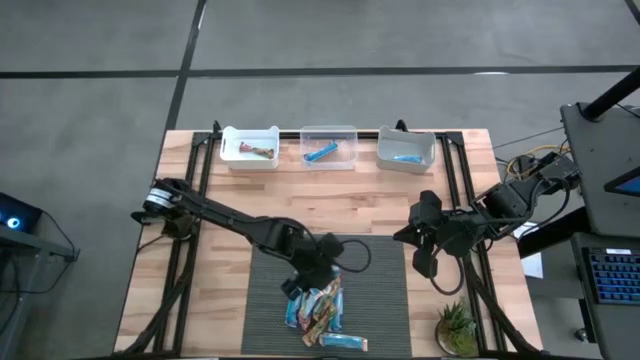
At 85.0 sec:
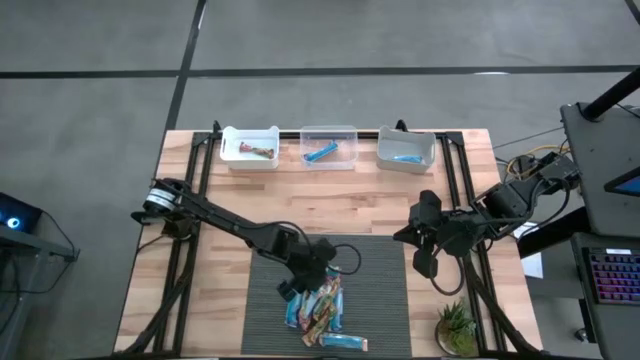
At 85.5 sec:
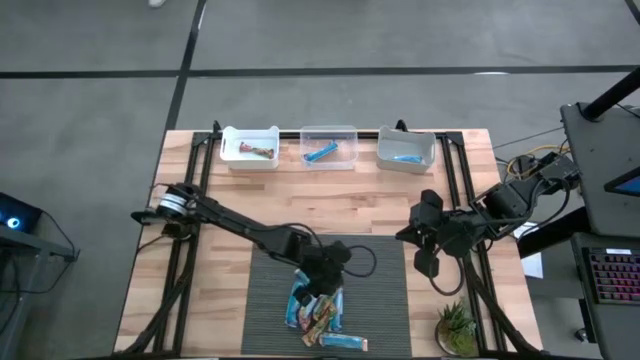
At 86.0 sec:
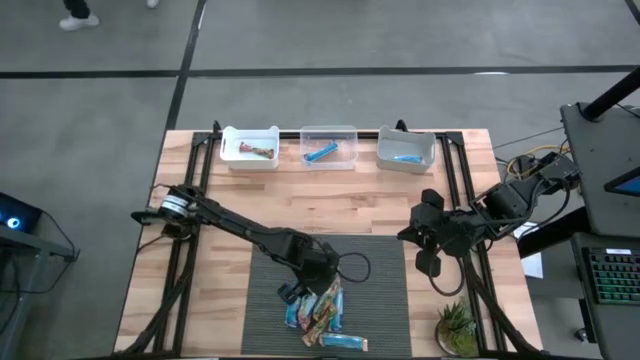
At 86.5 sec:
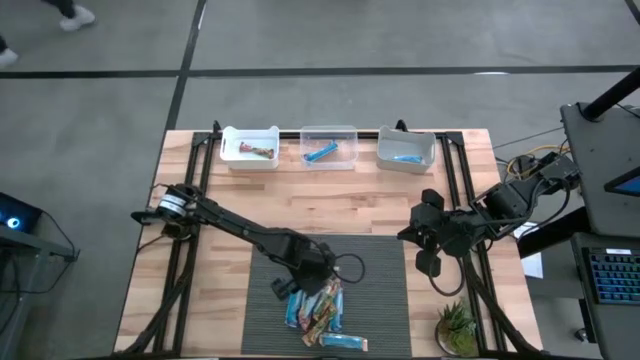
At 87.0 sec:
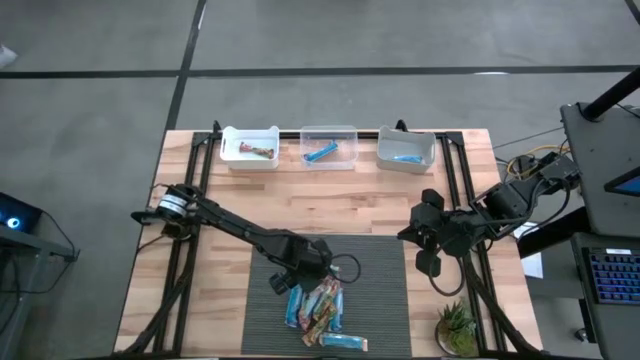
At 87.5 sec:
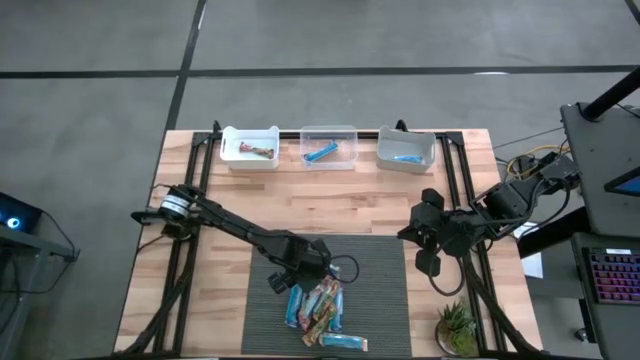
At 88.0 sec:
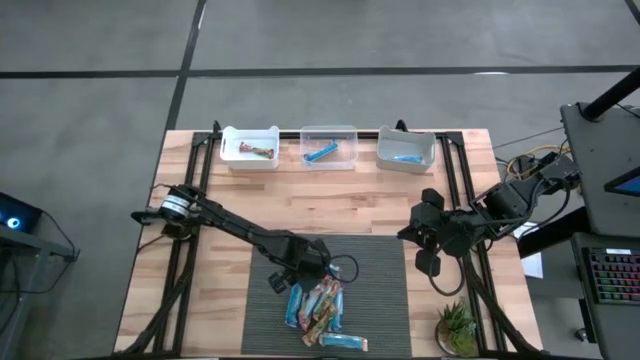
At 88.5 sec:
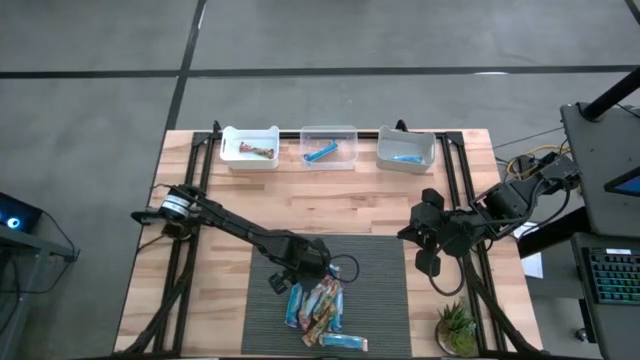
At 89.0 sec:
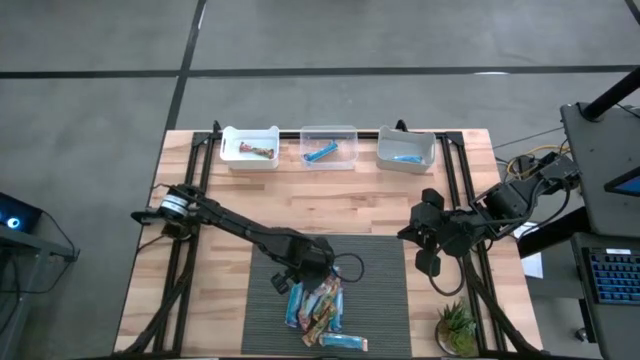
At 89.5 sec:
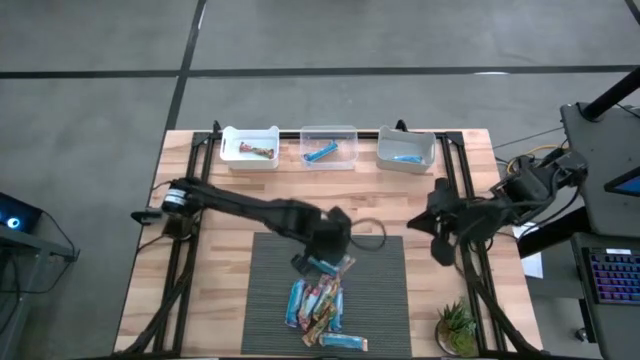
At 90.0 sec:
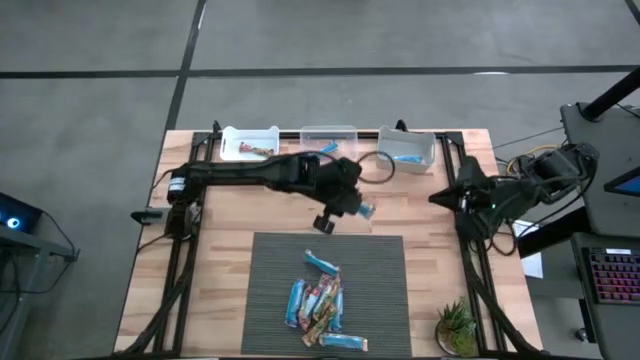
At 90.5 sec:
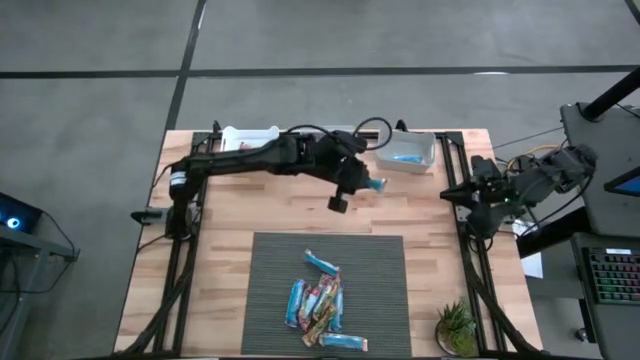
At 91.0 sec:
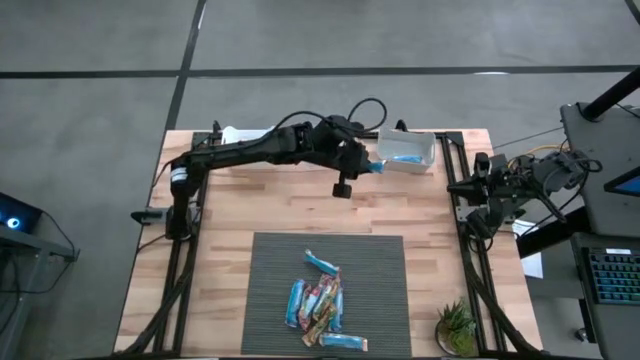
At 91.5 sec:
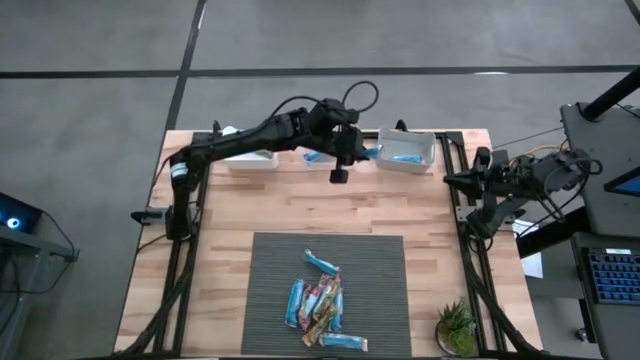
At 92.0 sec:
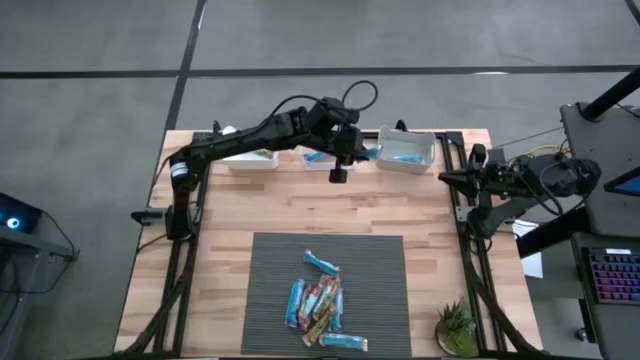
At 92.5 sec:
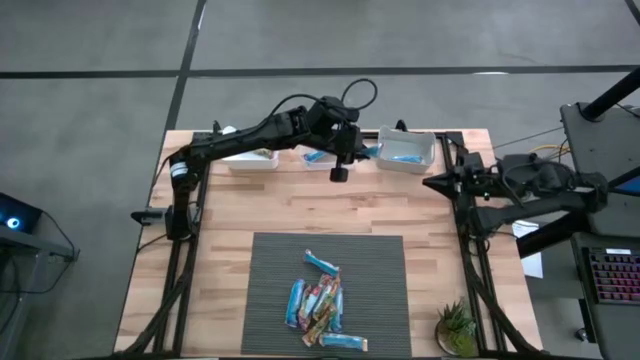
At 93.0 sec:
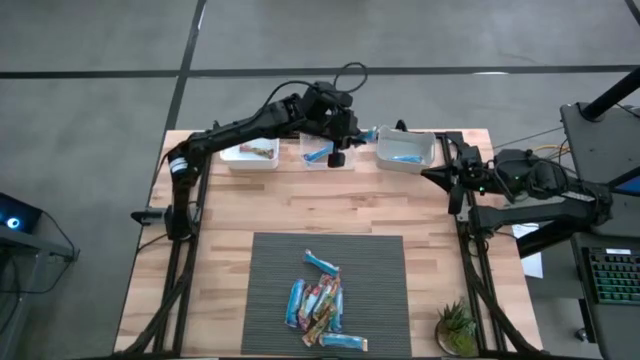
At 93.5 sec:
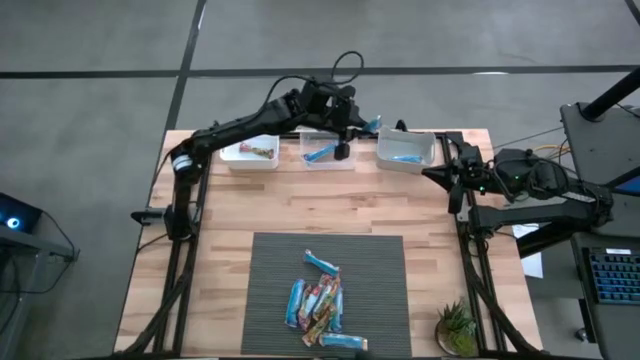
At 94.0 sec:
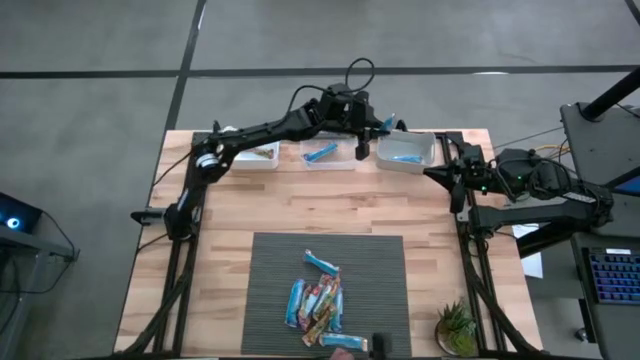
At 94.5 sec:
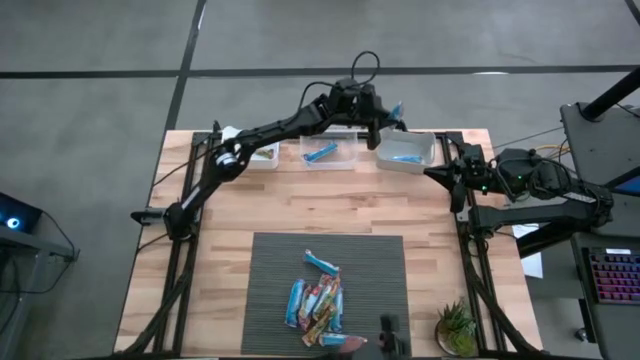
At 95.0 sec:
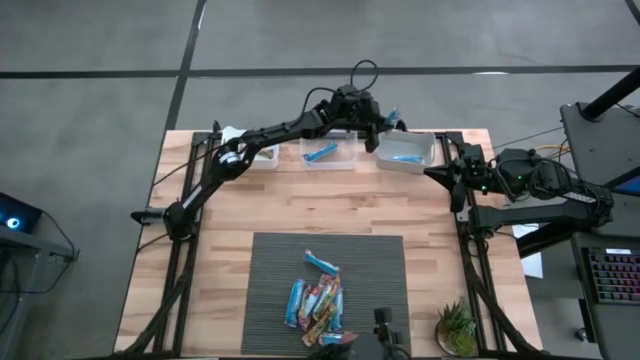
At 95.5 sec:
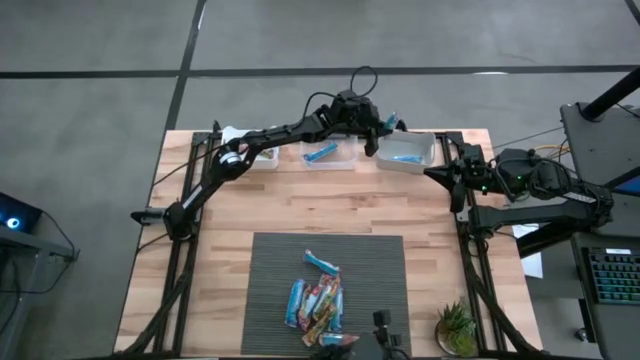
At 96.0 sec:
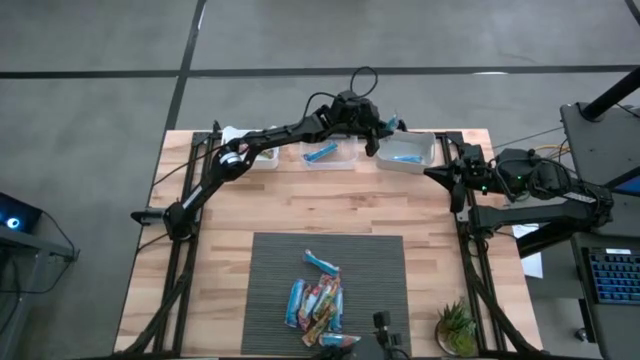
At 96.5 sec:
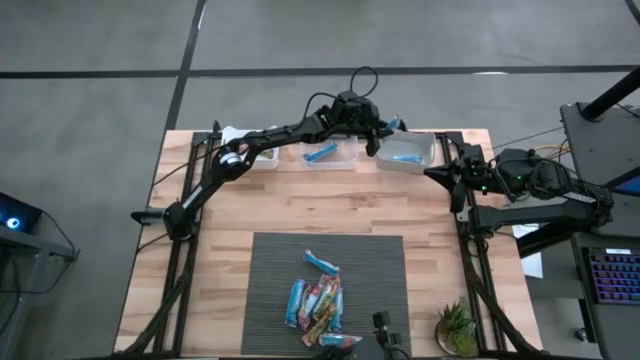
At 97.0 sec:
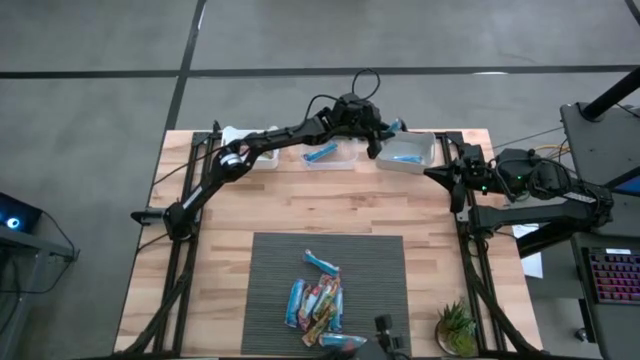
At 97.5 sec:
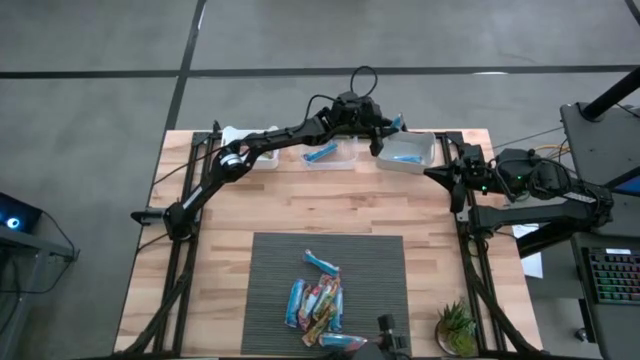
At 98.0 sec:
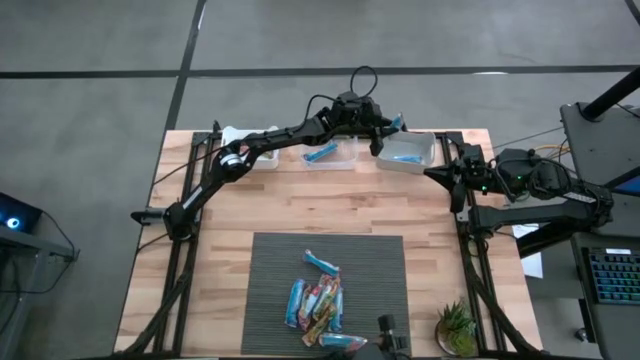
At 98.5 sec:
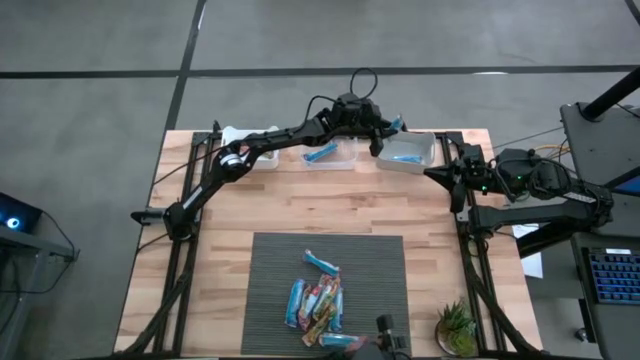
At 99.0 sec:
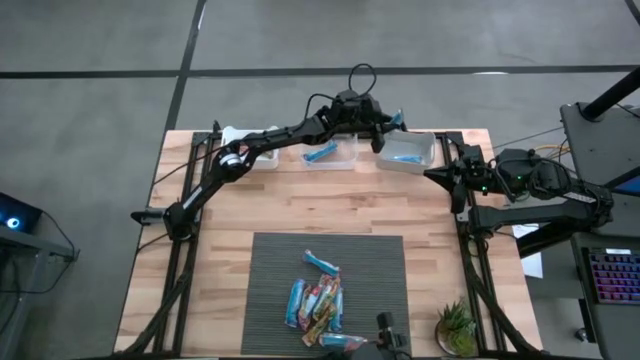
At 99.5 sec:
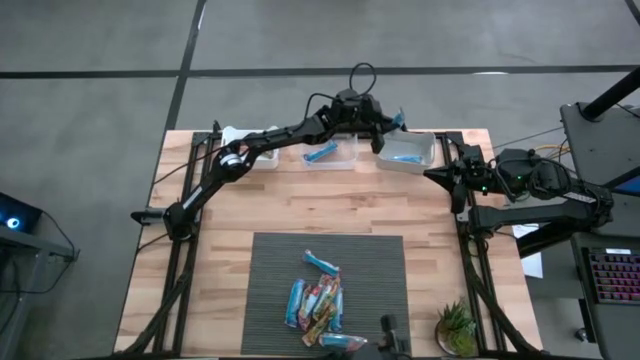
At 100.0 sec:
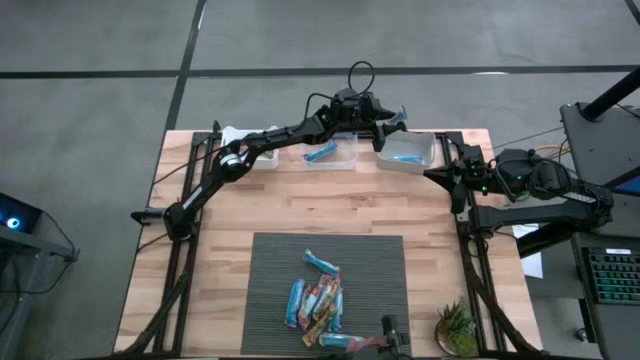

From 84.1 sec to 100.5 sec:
Task: Pick and place Granola Bars by type
Put the yellow granola bar into the gray bin

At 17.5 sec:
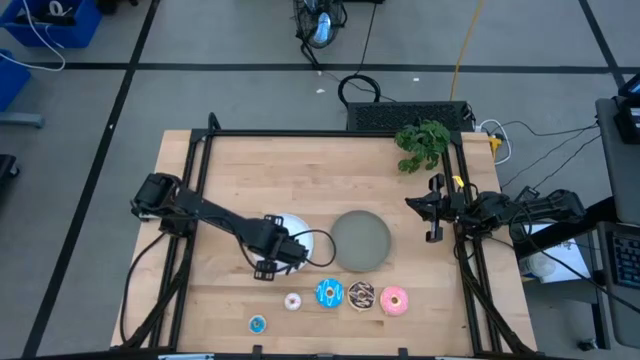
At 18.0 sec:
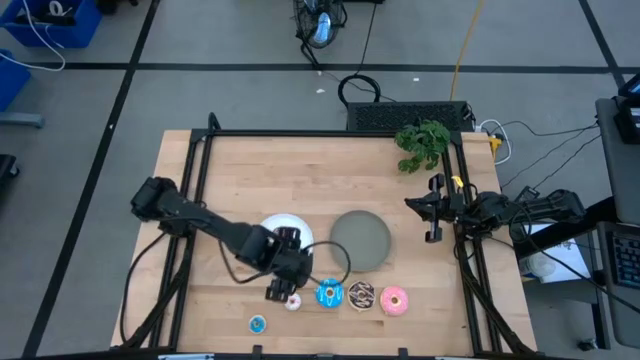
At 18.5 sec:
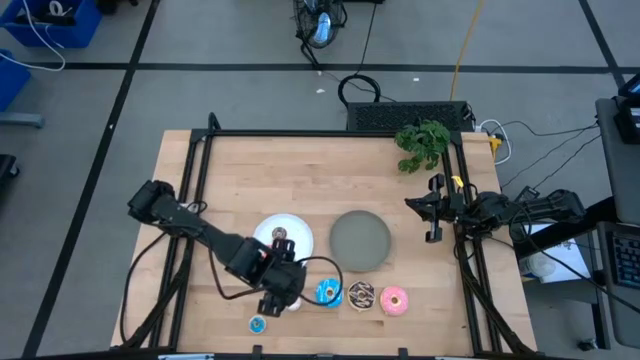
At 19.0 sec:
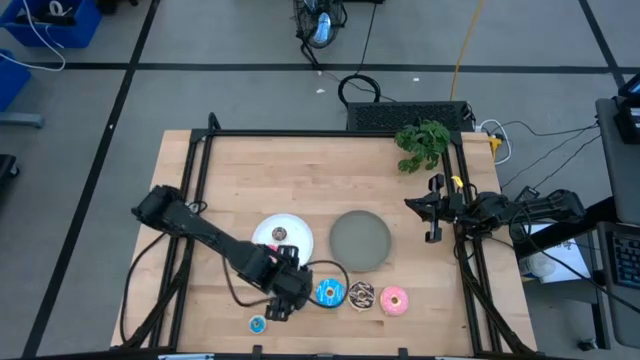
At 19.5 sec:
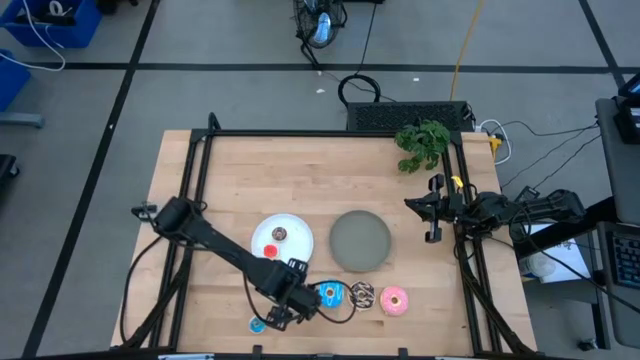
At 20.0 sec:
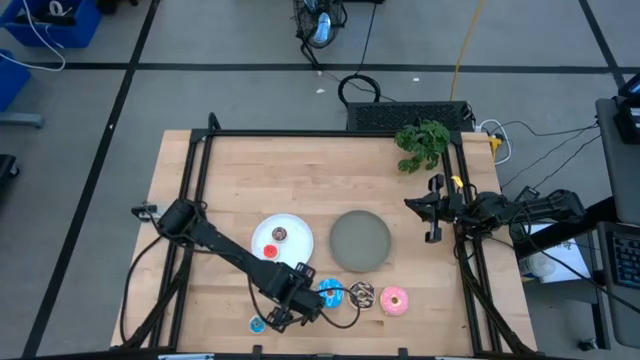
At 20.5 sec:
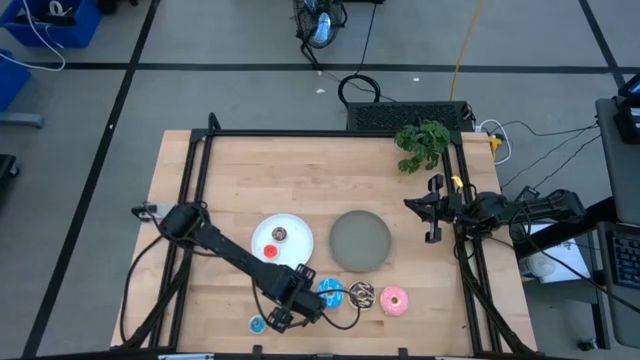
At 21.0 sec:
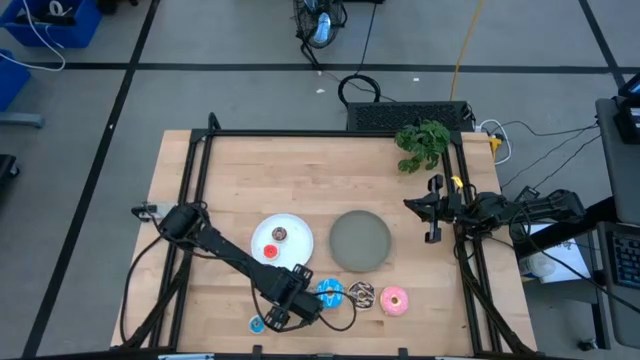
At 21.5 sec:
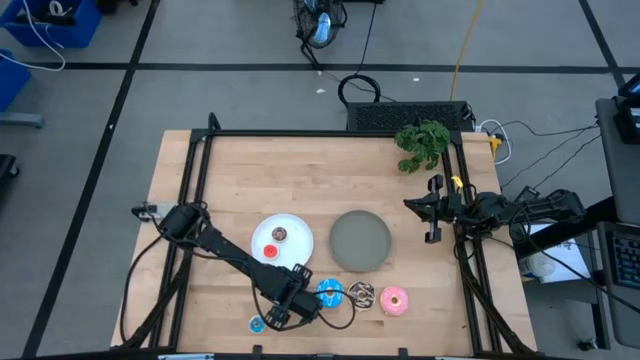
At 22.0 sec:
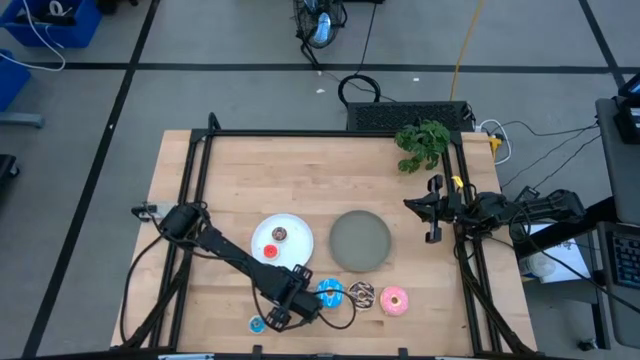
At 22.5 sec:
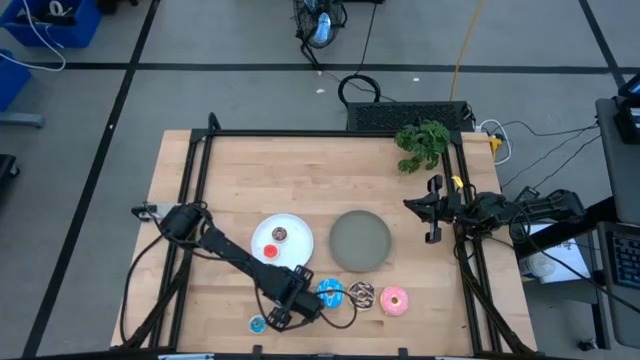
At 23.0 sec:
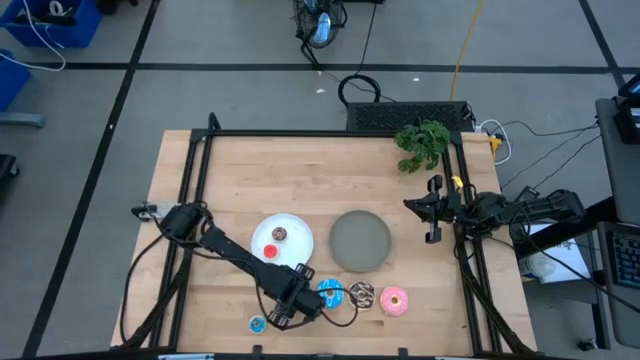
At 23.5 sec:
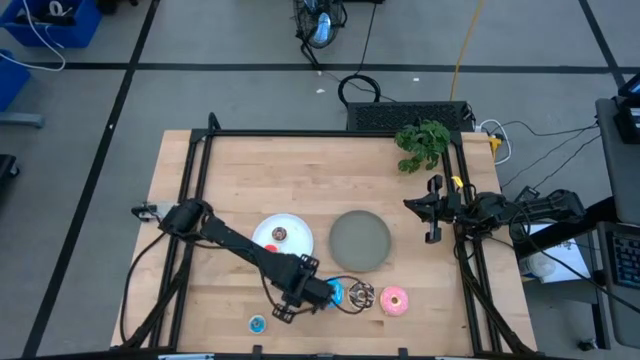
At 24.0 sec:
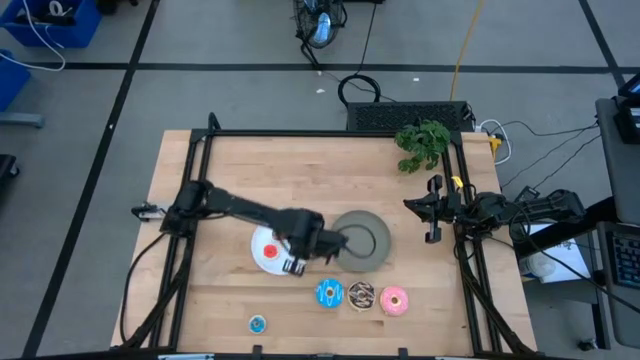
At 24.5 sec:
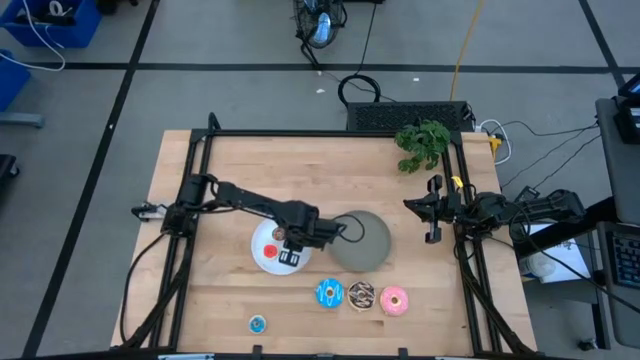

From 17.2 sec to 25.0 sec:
Task: Pick & Place donuts
Put the small white donut on the white plate
